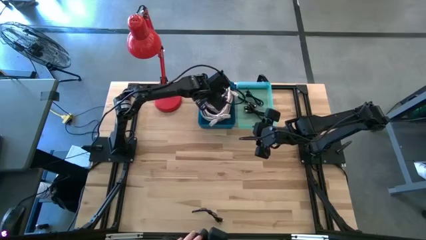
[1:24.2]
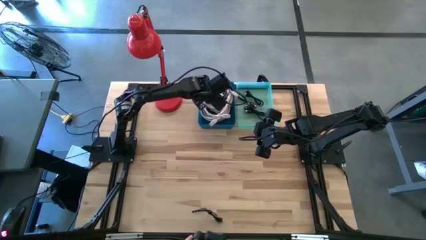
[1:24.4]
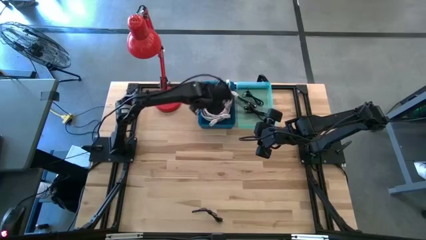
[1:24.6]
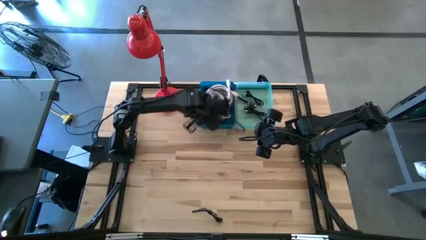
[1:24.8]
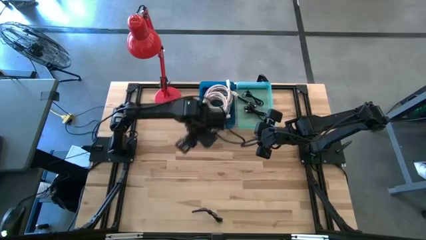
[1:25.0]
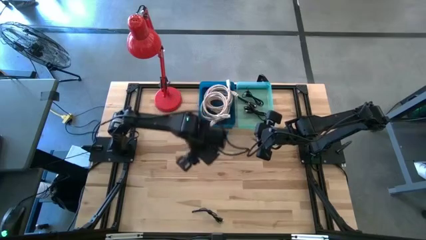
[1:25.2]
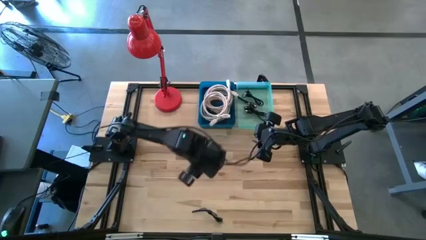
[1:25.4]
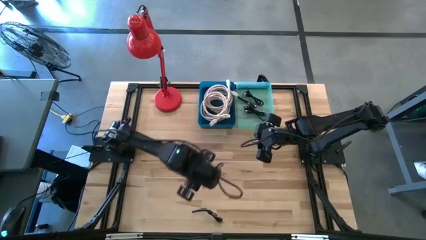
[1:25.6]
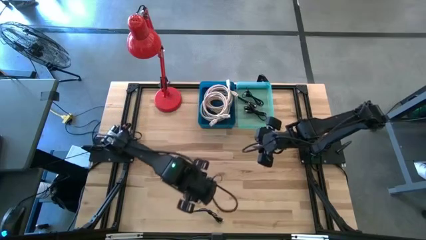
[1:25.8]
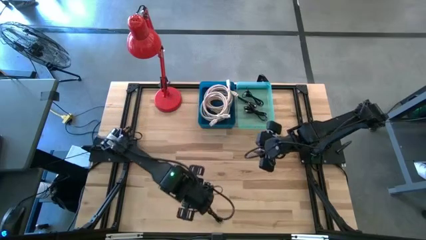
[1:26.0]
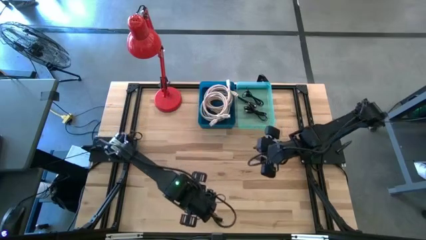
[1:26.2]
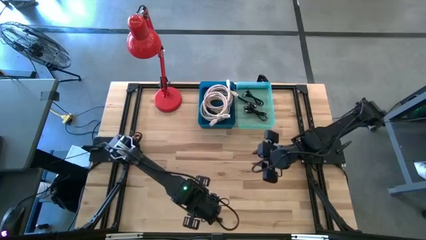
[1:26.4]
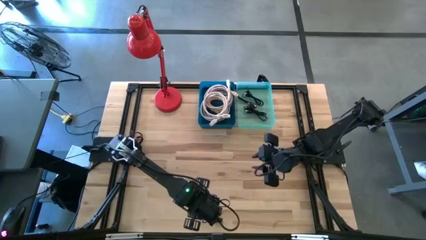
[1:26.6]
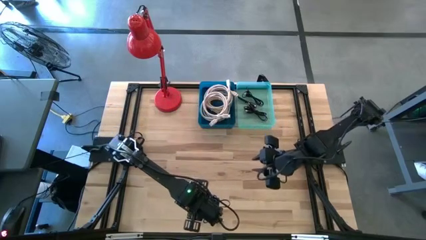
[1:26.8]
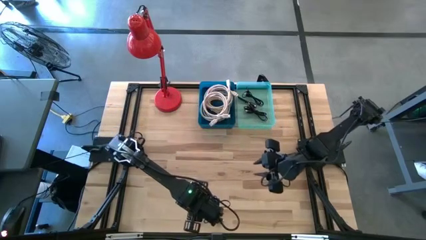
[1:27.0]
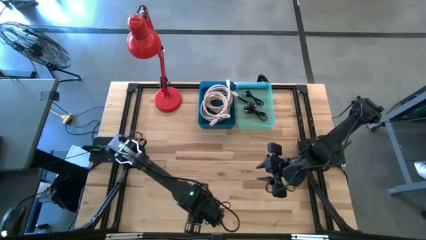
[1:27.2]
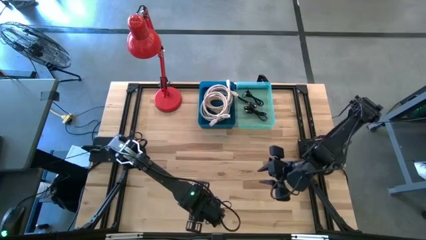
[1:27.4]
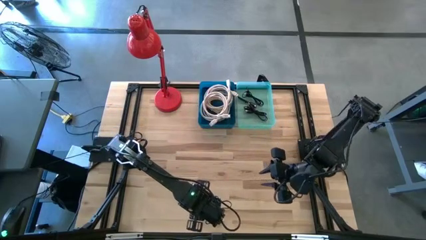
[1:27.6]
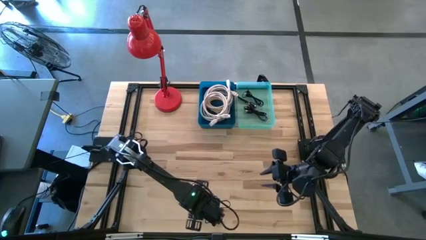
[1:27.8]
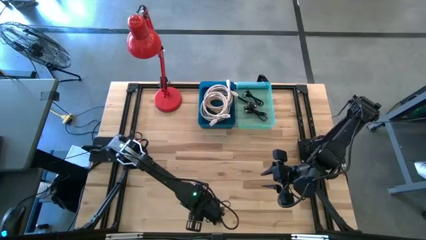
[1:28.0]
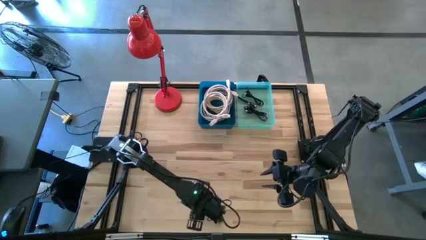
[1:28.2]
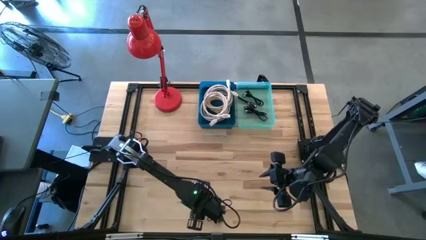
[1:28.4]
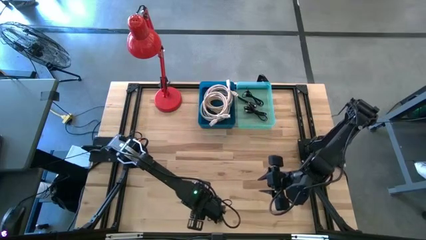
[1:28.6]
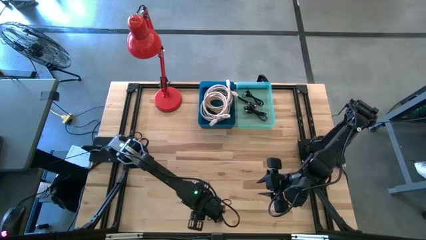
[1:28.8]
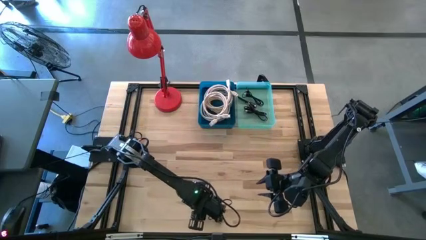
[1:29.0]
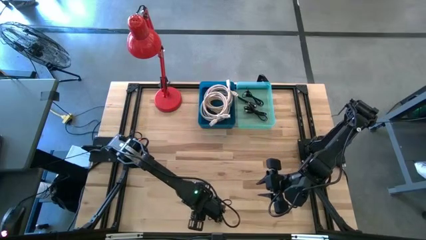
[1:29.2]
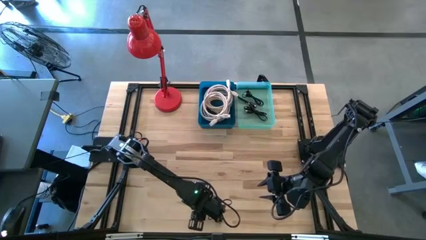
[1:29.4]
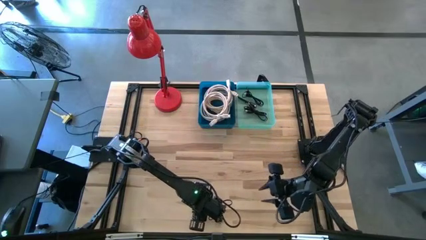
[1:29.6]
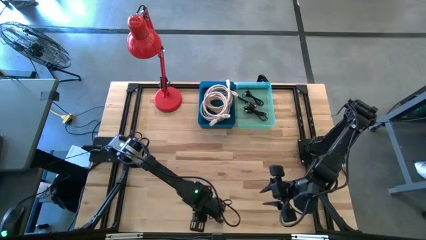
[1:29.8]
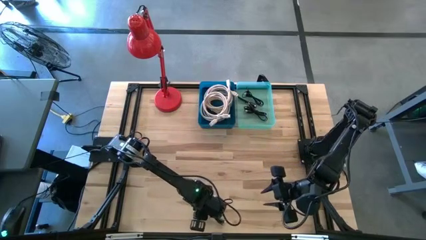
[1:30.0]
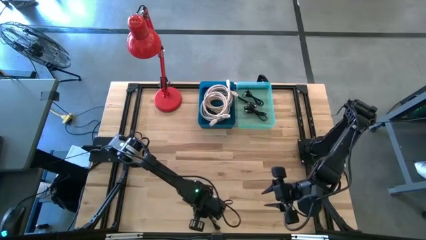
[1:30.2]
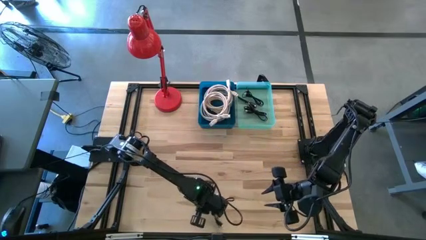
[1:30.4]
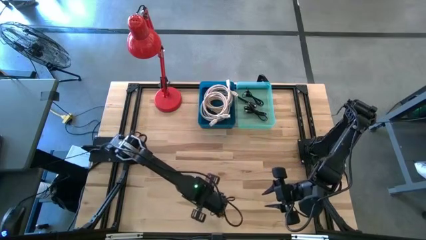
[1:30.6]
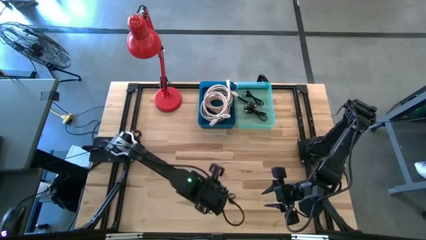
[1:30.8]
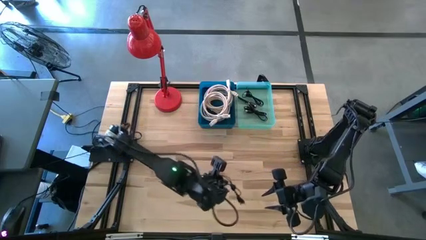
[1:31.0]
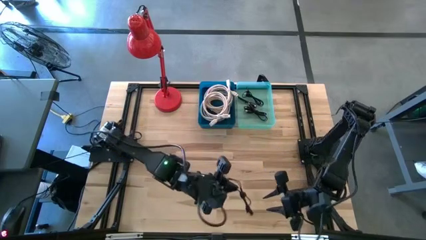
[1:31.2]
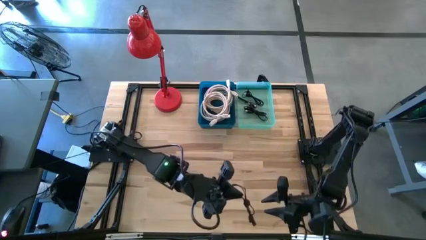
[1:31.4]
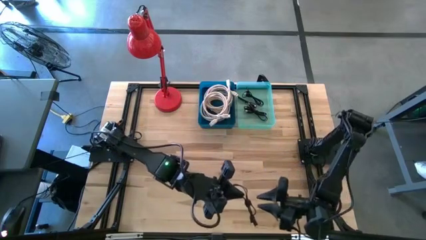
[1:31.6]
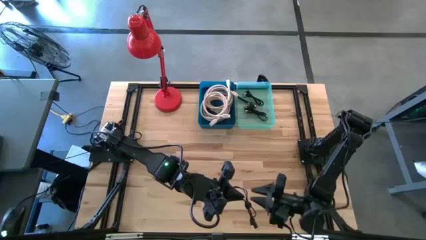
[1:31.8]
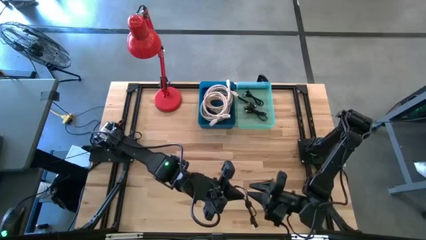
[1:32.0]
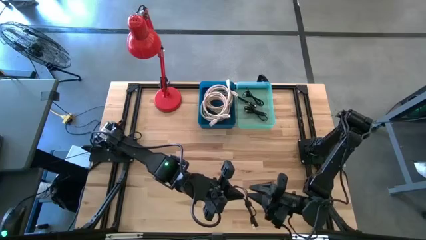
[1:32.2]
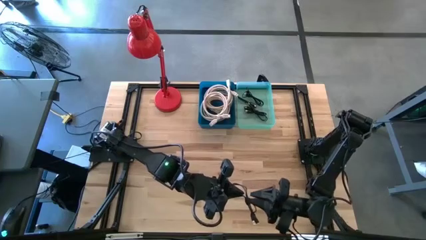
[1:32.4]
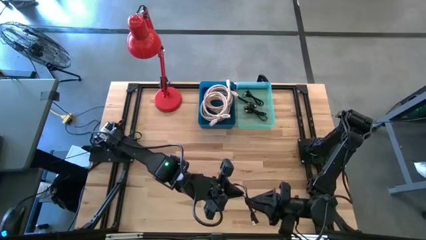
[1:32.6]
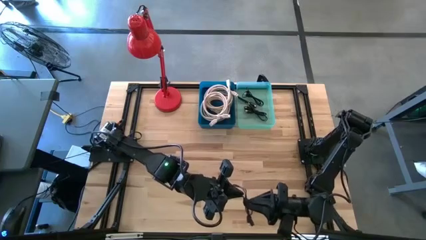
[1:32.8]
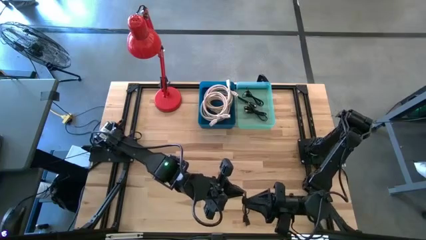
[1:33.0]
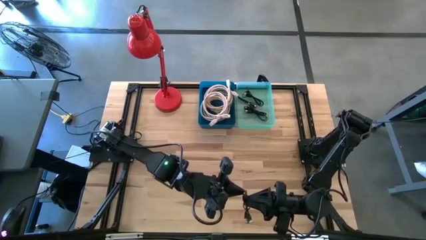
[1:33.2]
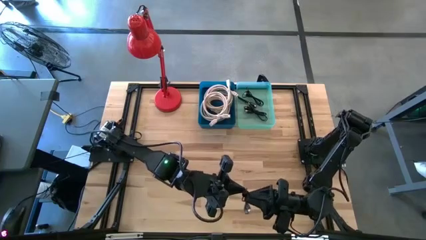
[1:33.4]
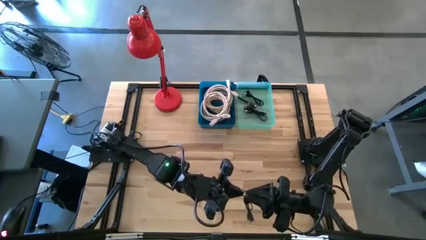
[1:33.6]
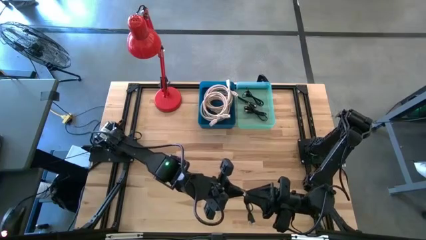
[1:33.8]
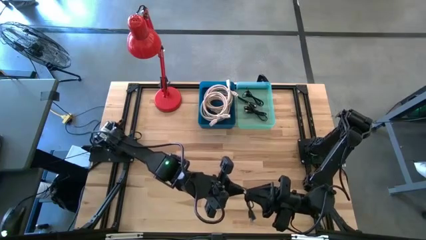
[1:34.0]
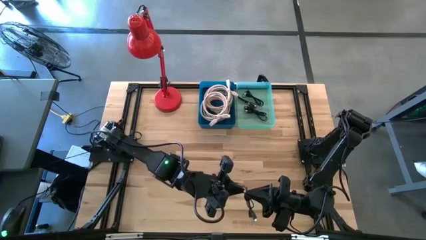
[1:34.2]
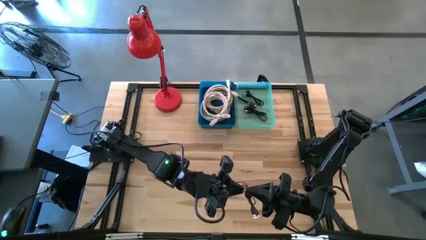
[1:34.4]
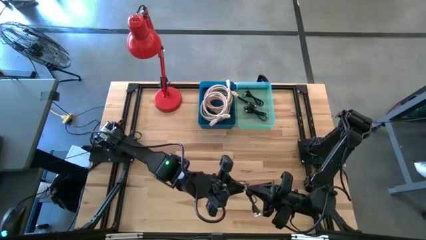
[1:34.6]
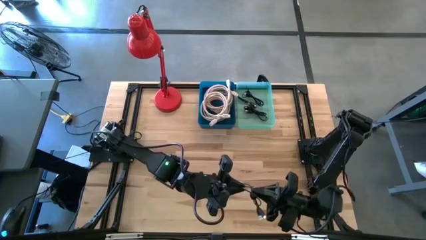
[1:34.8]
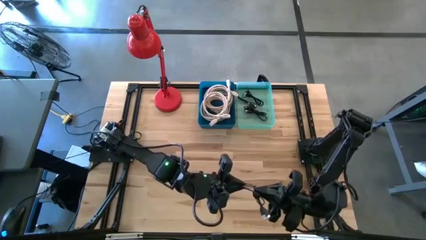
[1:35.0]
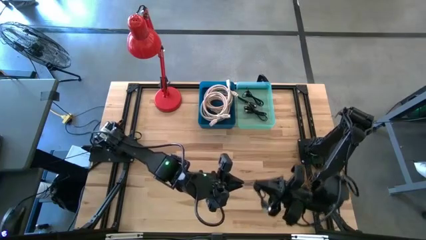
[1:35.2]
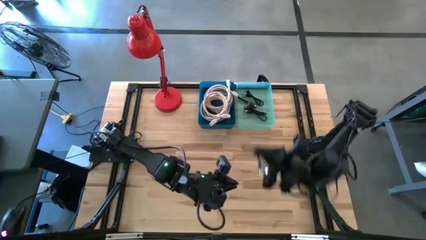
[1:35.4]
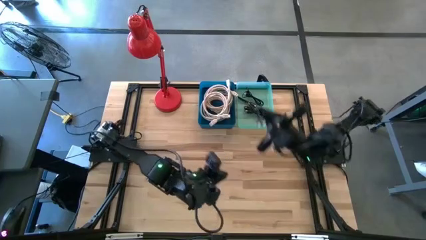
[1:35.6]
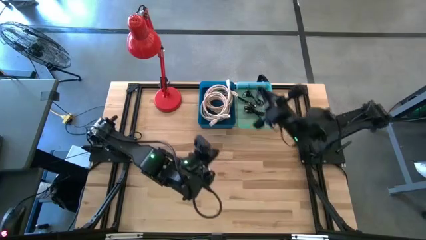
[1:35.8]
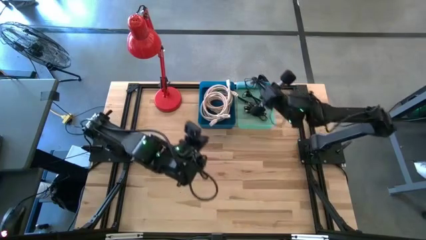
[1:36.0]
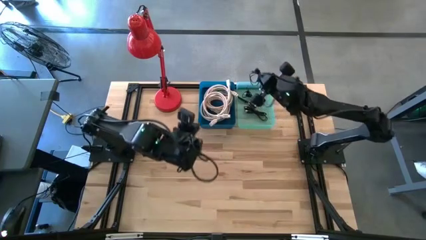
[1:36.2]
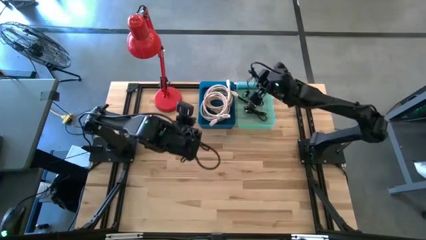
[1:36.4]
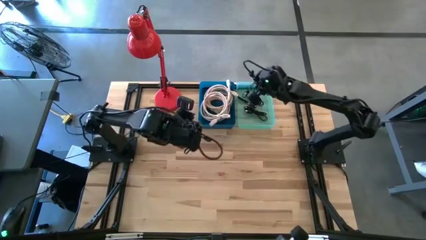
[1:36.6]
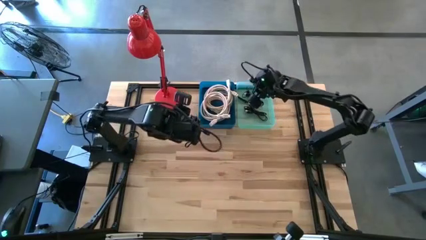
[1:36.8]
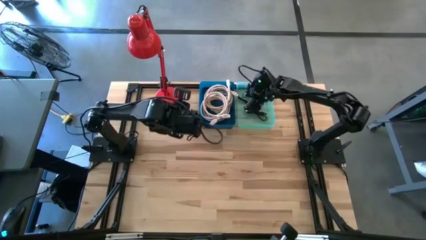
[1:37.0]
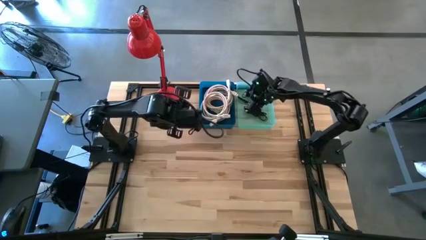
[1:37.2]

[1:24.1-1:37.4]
Task: Pick & Place USB Port
Put the black charger cable into the green bin

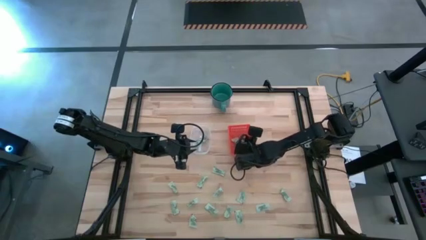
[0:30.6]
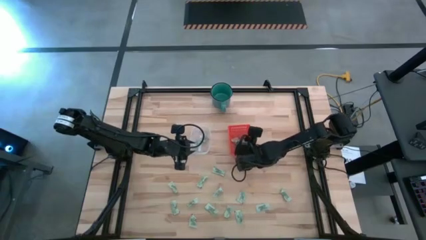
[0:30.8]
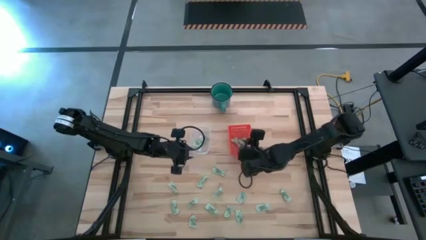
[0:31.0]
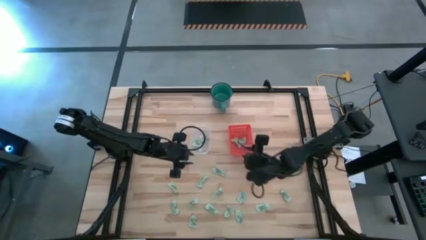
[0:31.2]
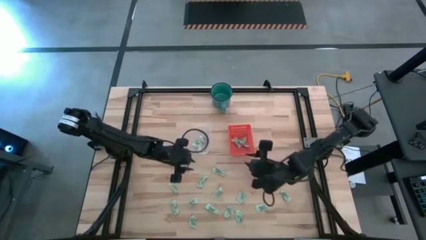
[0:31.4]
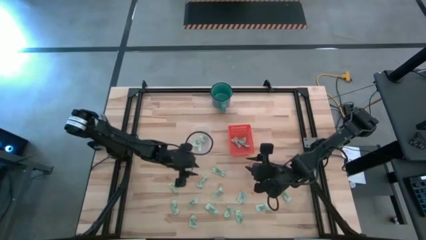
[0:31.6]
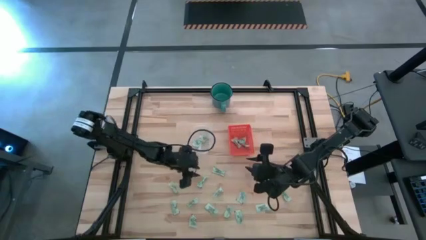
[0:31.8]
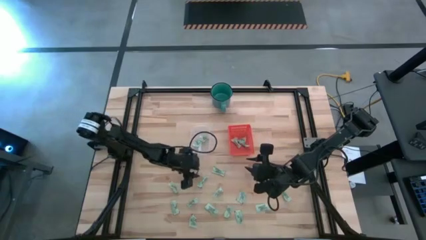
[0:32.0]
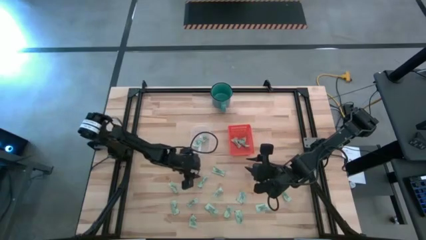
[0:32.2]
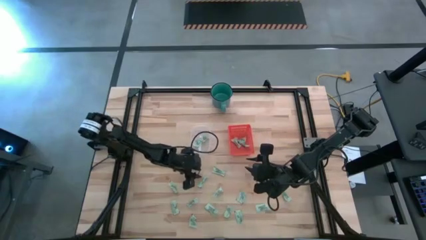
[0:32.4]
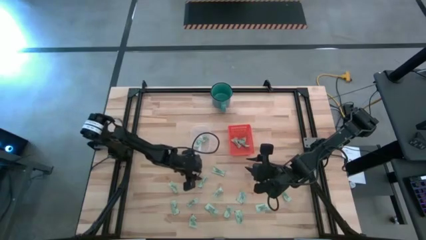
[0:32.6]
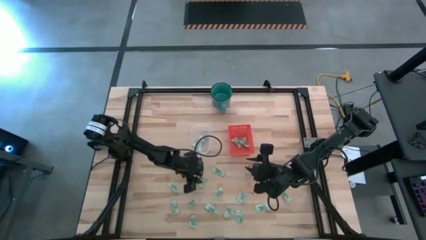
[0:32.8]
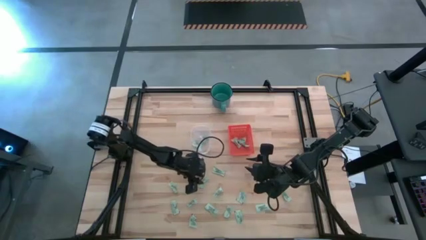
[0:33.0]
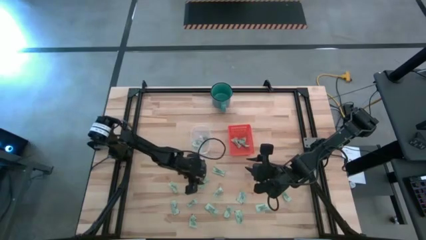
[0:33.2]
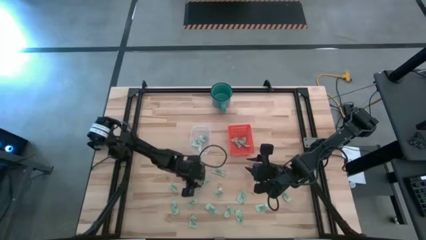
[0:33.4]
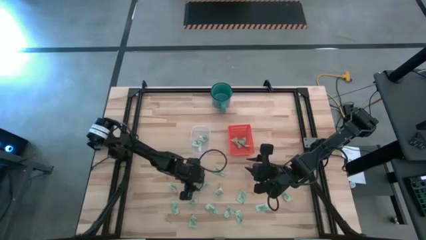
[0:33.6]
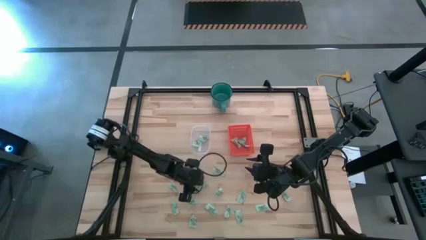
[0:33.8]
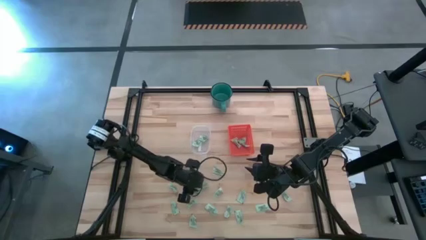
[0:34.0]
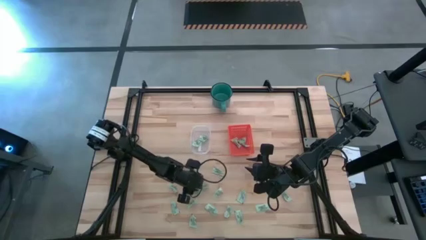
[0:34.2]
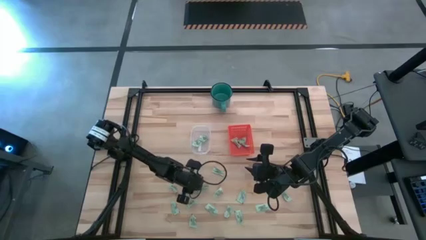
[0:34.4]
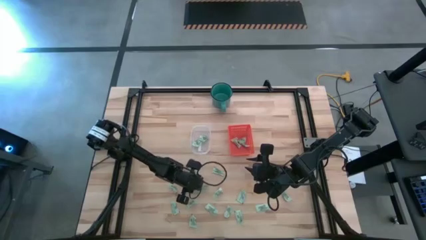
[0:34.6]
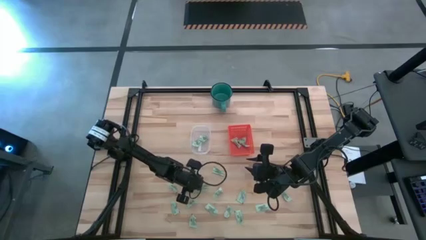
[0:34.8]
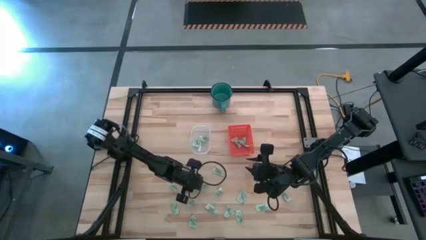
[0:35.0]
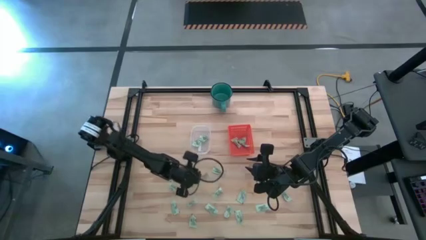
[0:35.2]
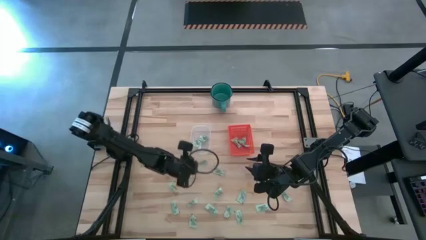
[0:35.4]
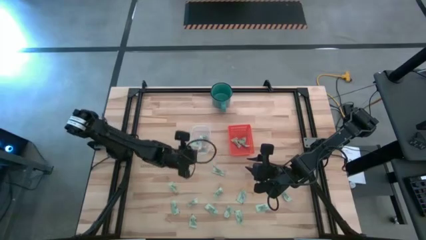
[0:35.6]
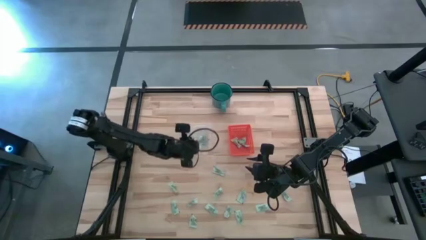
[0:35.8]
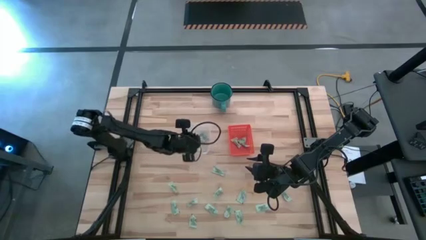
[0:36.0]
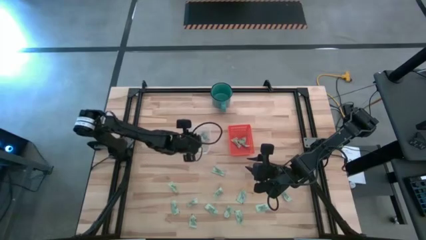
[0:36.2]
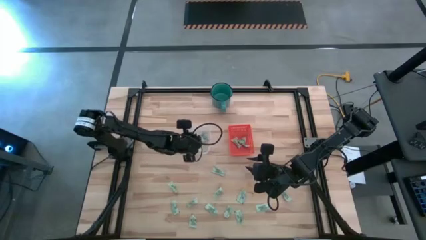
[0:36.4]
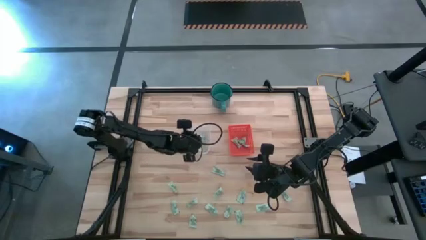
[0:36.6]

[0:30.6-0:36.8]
Task: Pick and place items into bin
Put the stevia packet into the transparent bin
